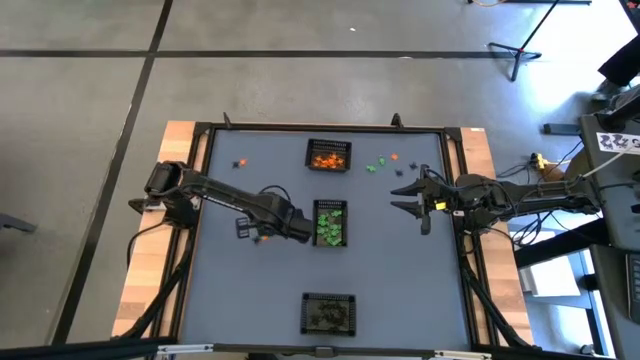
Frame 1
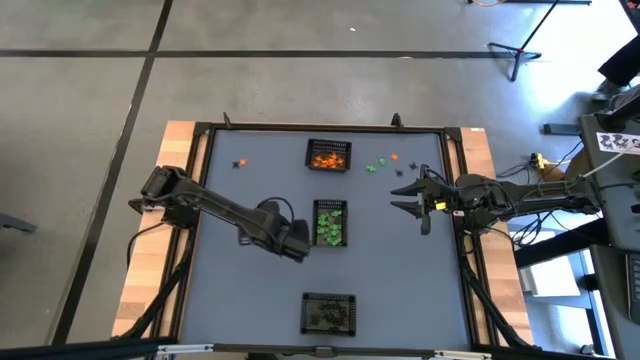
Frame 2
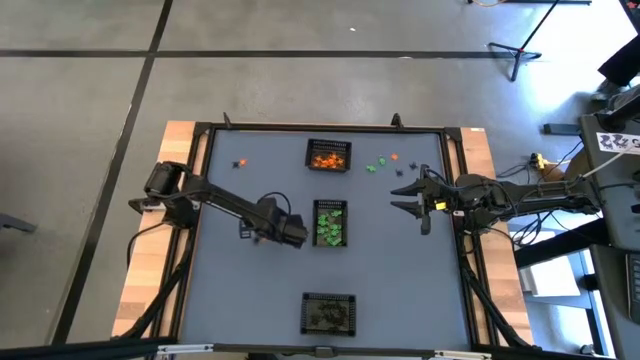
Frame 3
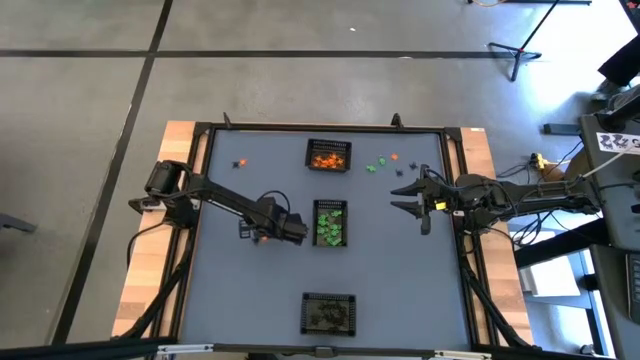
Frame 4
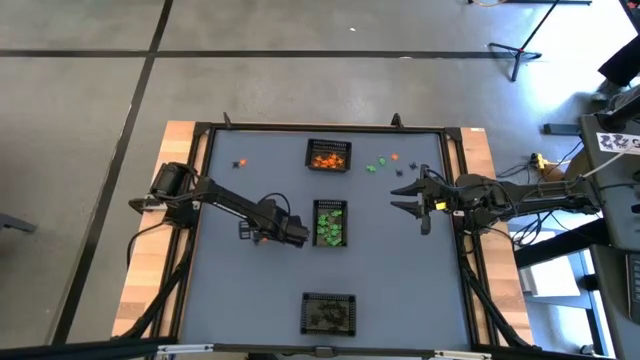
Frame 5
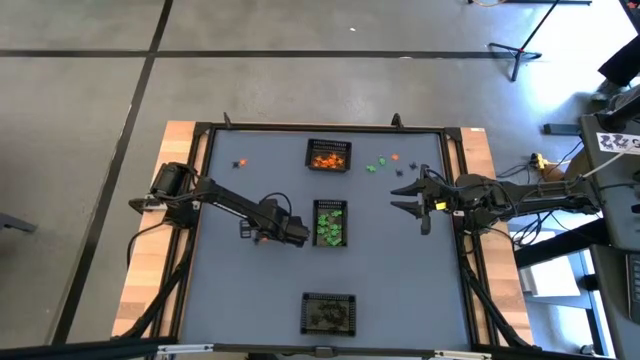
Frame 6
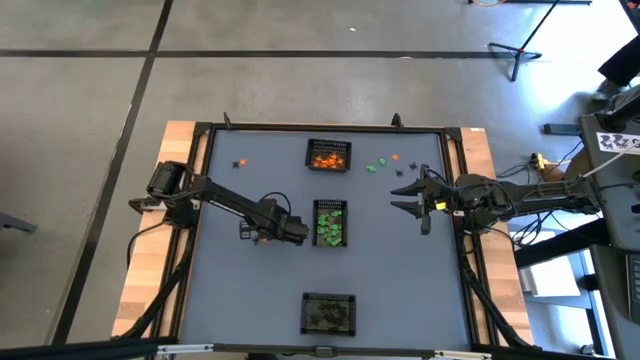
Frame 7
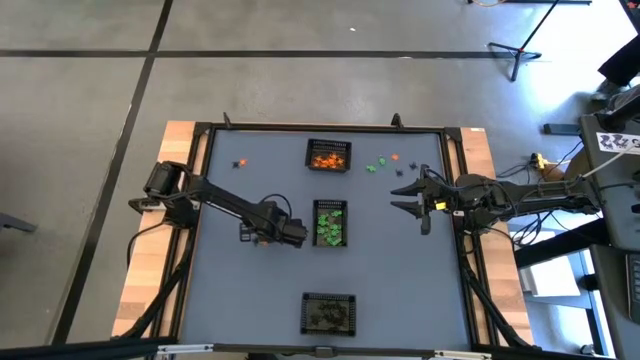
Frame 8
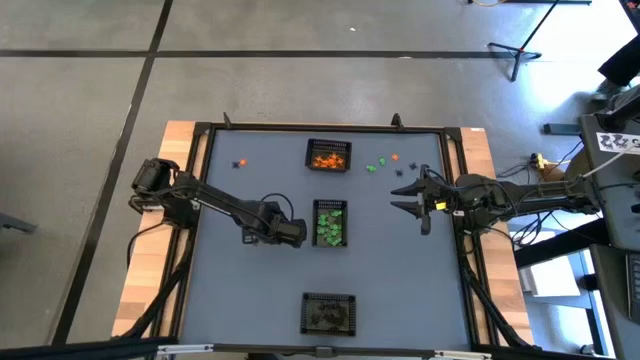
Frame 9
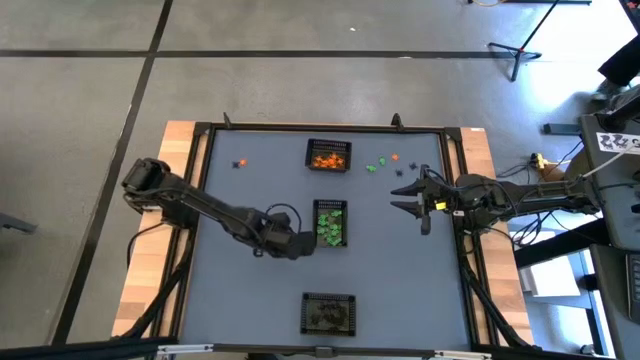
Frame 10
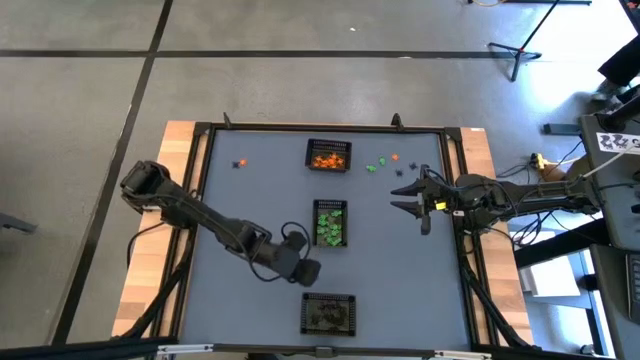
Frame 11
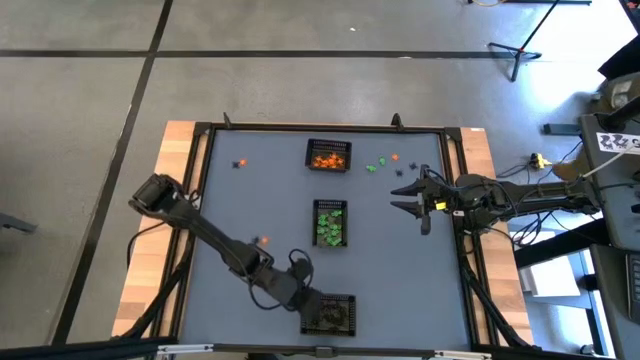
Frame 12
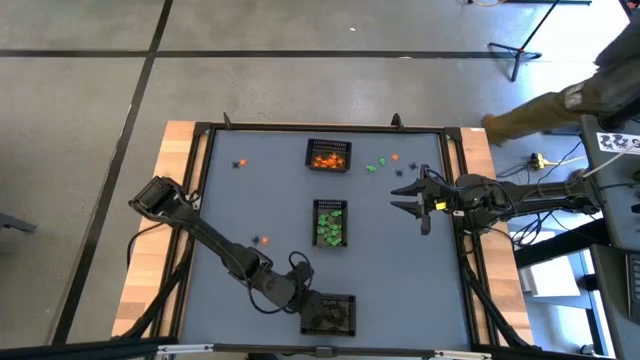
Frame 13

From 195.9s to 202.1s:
Task: Sort Halloween decoration
Put the black spider toy into the bottom black bin

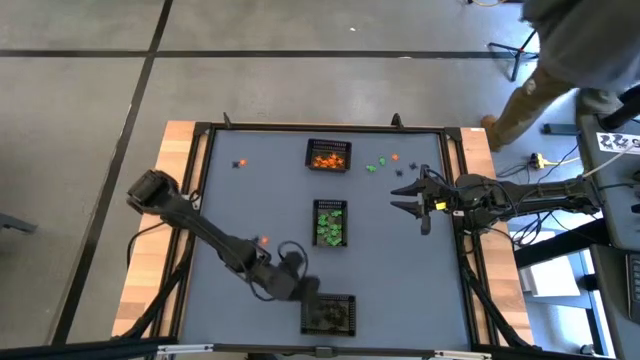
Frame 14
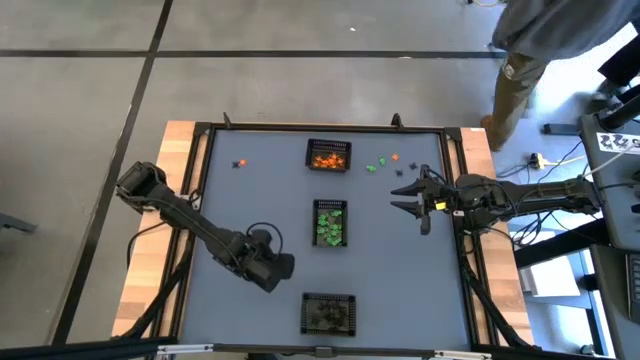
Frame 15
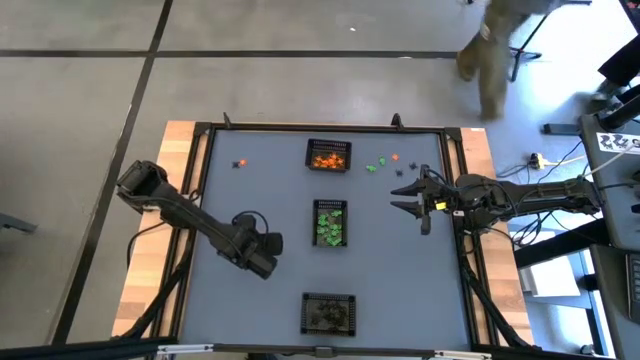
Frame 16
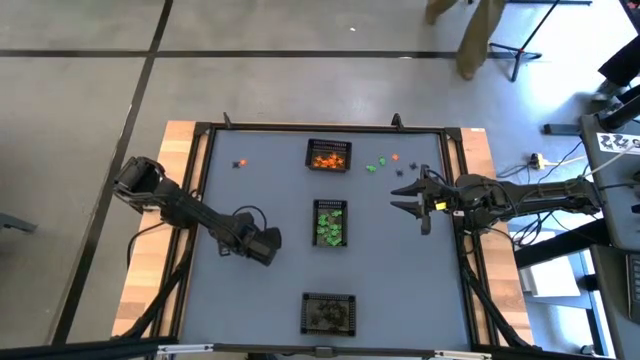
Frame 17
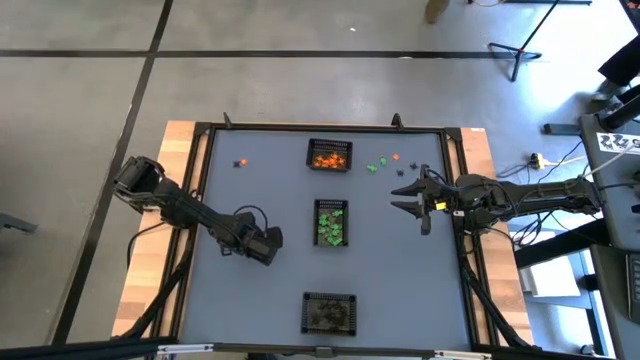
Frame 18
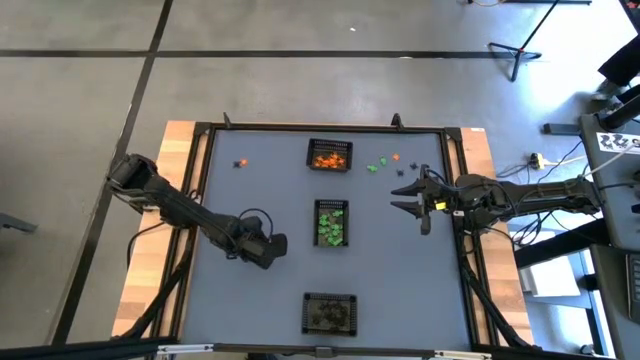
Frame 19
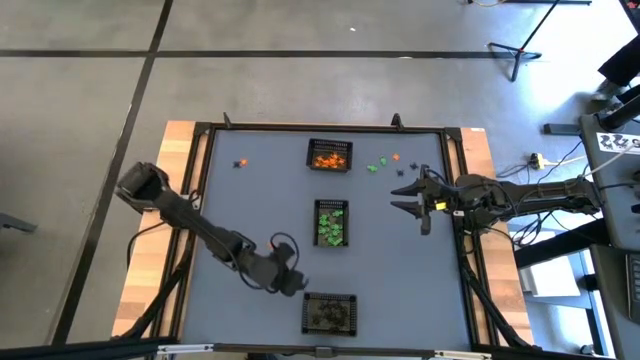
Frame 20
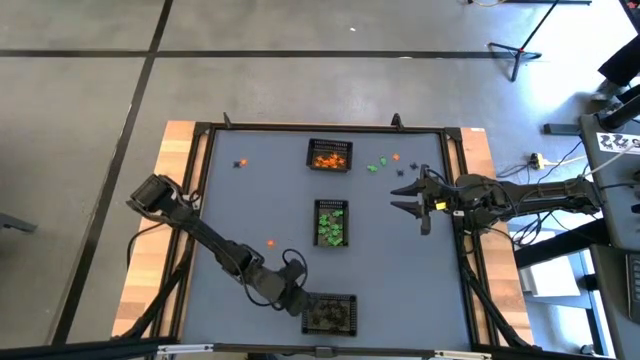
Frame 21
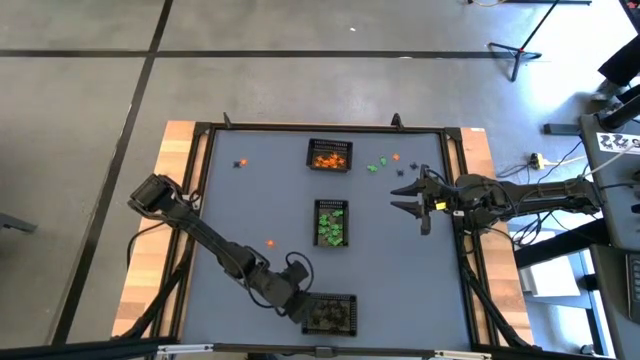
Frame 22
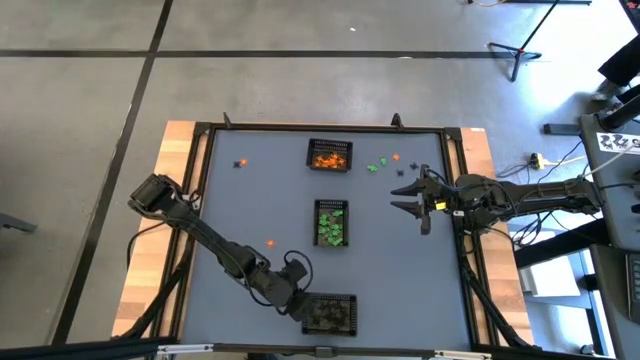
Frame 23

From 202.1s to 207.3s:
Put the black spider toy into the bottom black bin

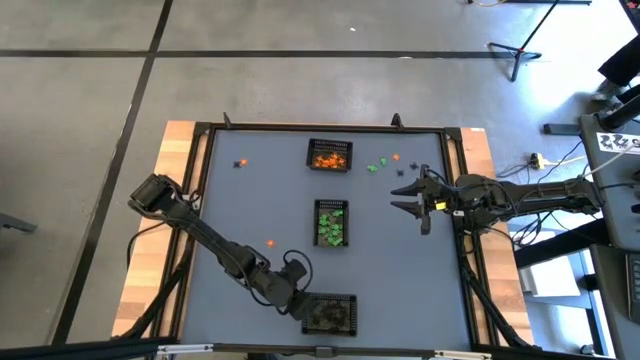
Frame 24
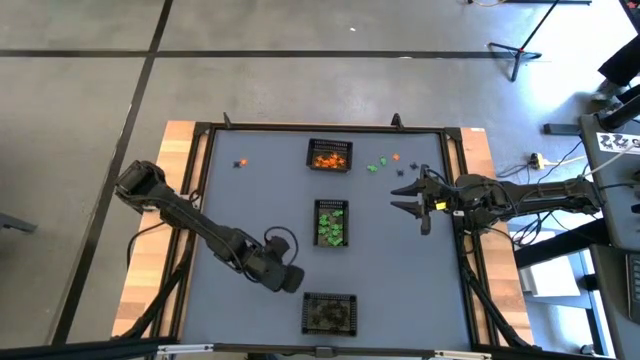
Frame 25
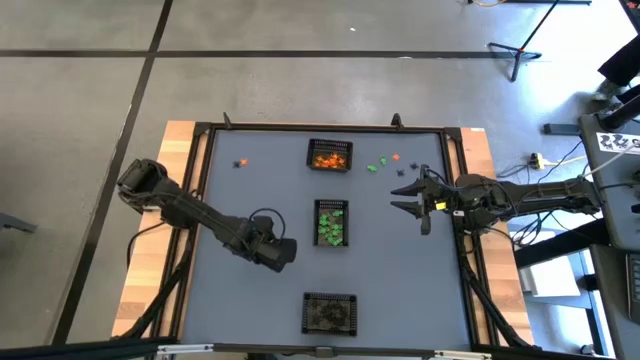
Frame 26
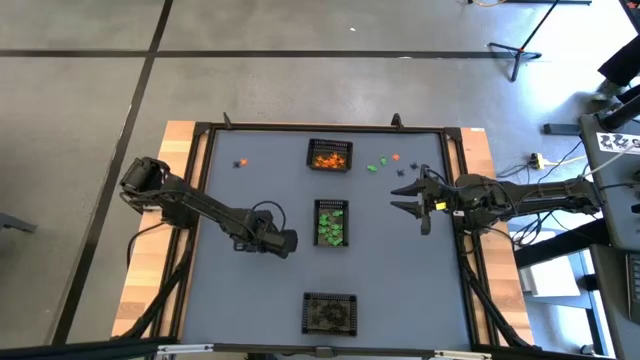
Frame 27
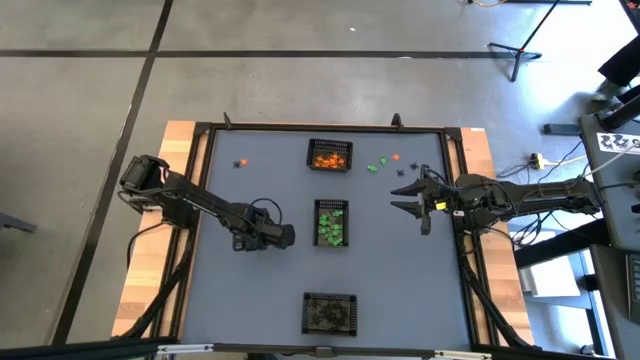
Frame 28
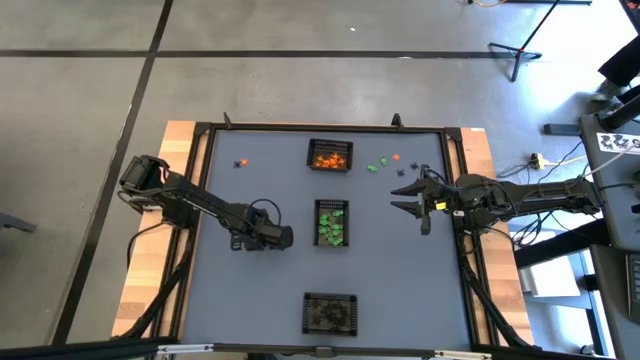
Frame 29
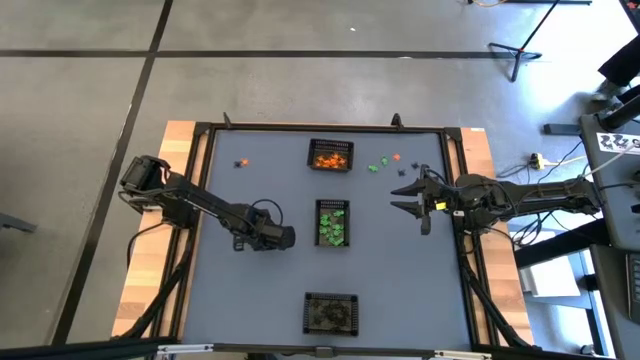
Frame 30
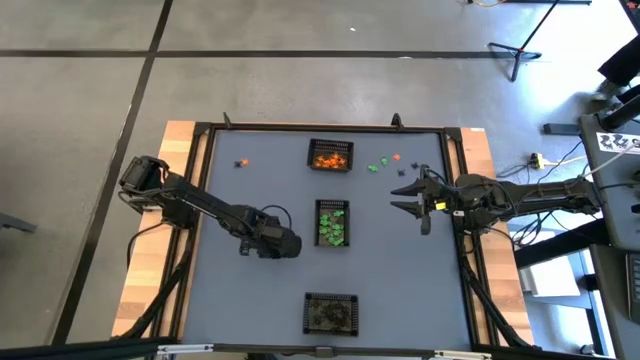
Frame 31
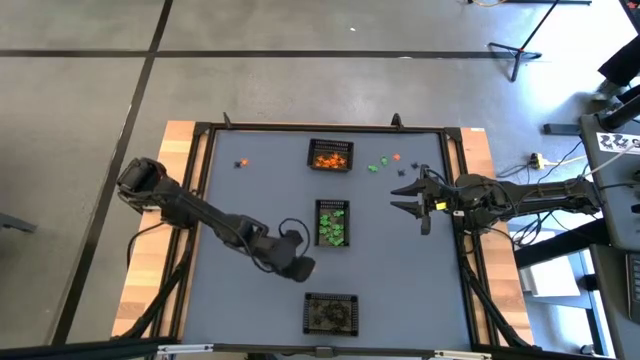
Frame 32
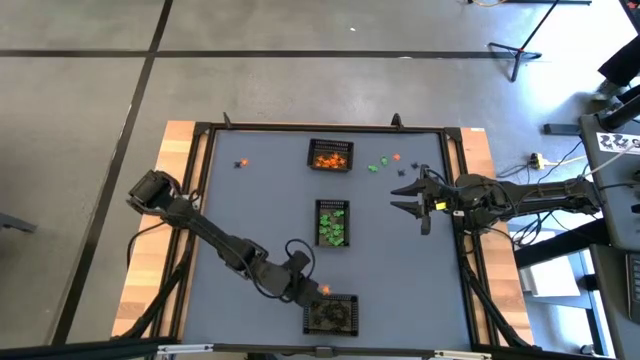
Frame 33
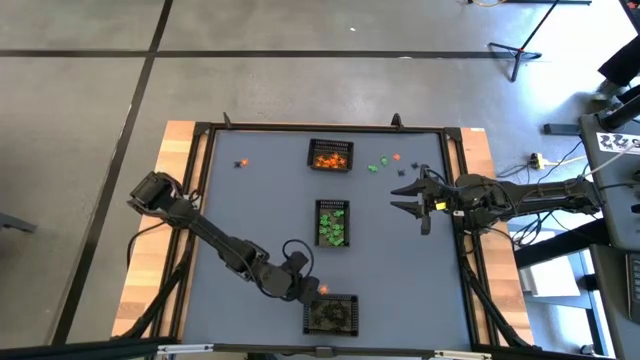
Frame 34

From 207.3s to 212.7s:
Put the black spider toy into the bottom black bin

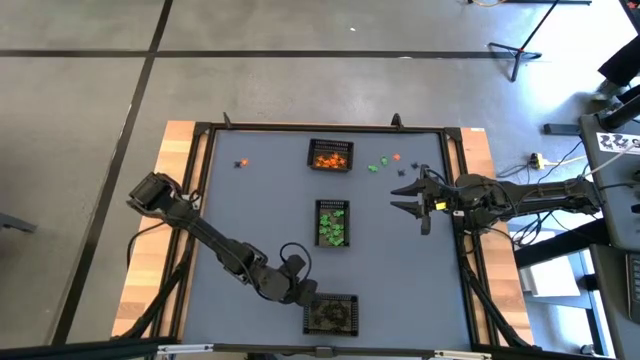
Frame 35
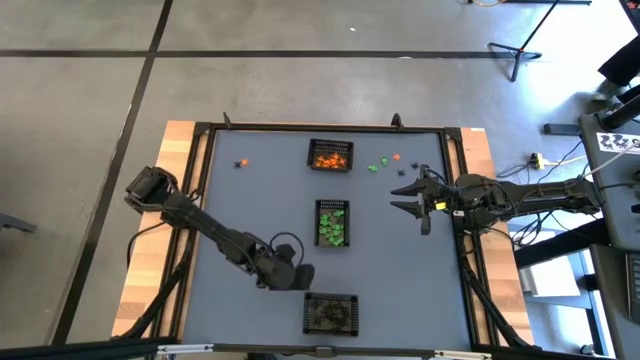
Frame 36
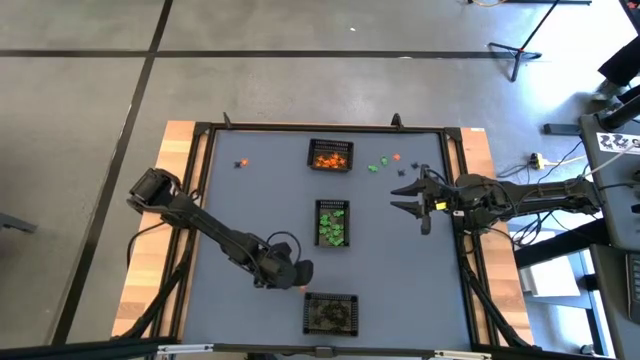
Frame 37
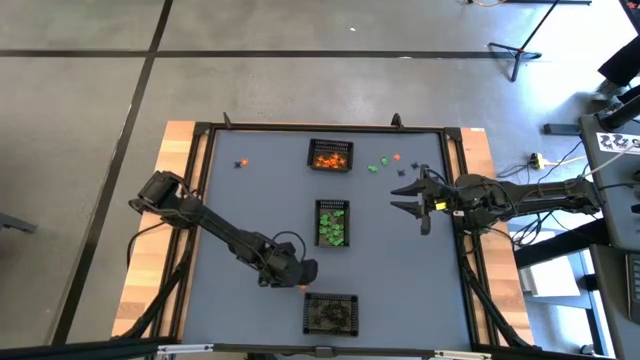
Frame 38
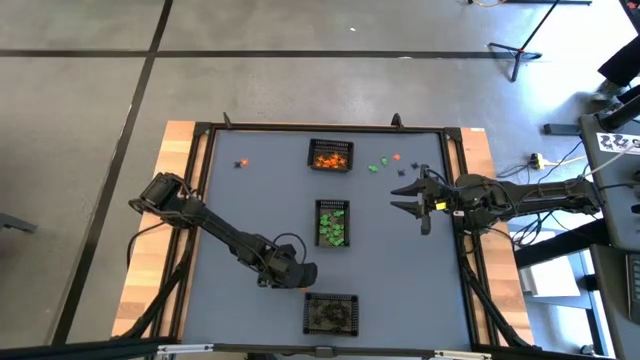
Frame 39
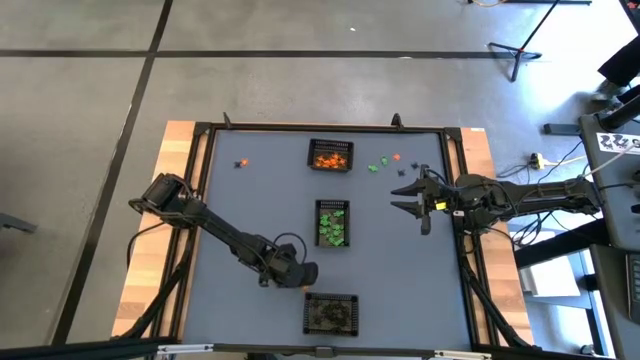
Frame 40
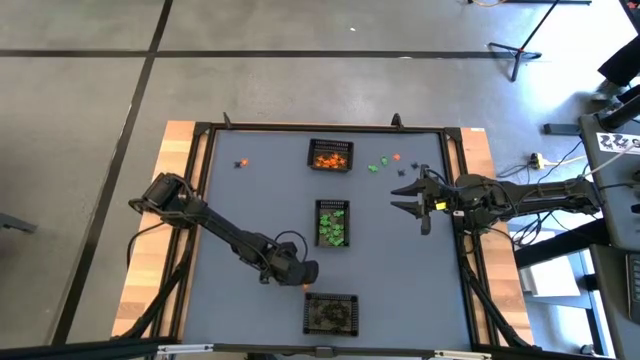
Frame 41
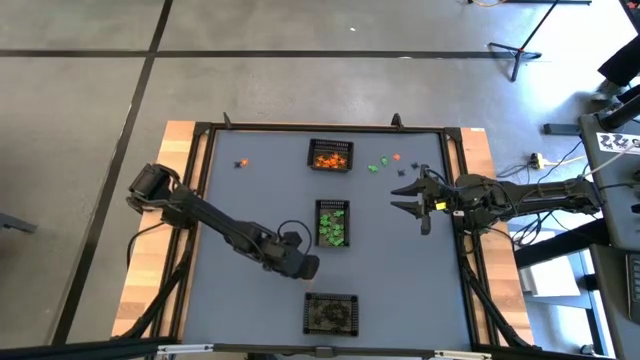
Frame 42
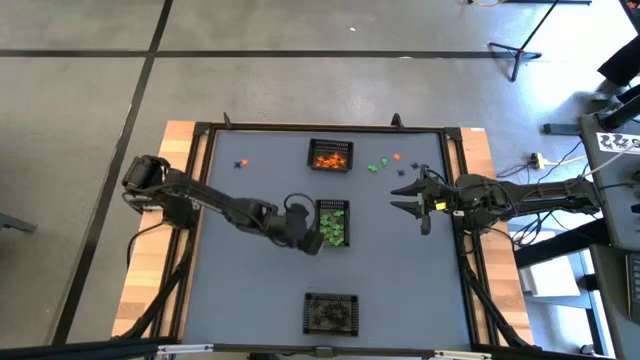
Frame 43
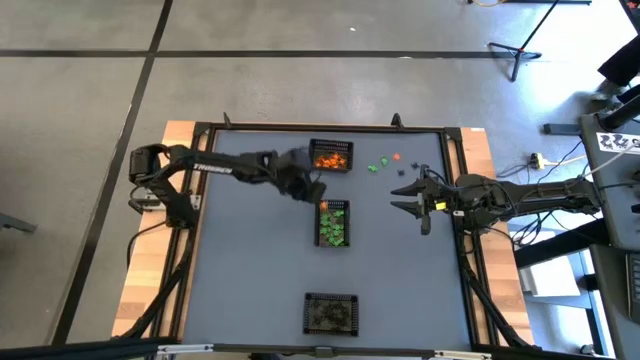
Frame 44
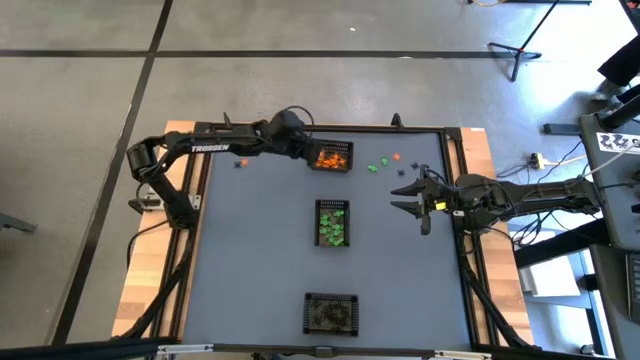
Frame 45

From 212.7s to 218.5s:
Put the black spider toy into the bottom black bin
